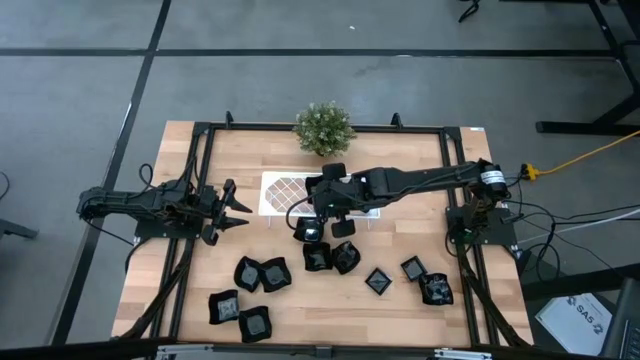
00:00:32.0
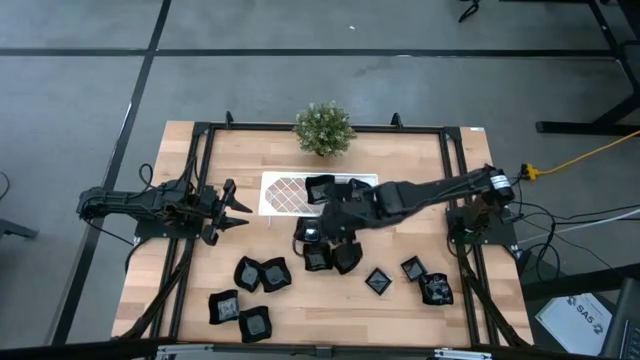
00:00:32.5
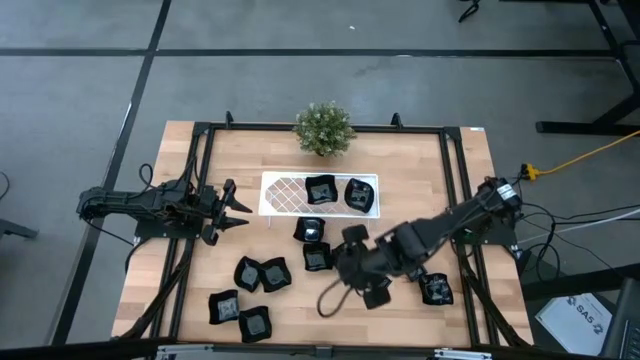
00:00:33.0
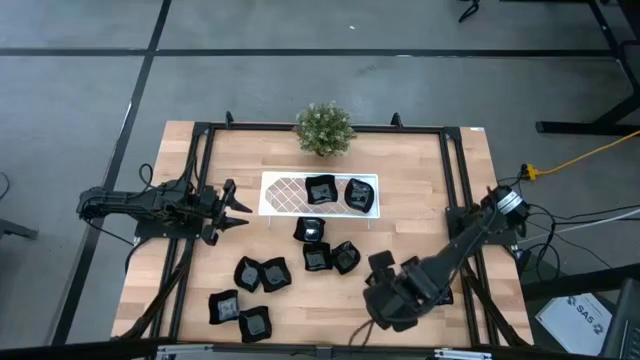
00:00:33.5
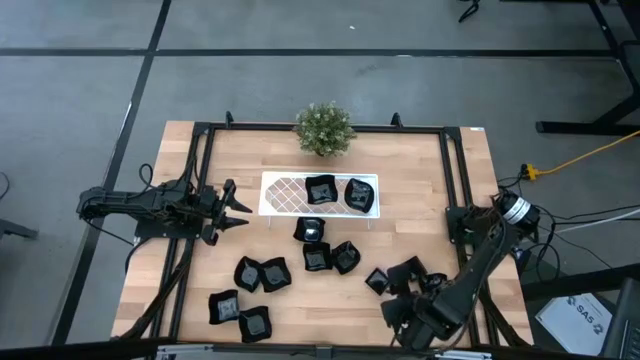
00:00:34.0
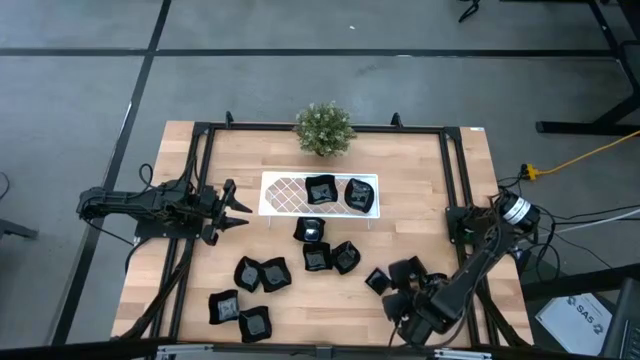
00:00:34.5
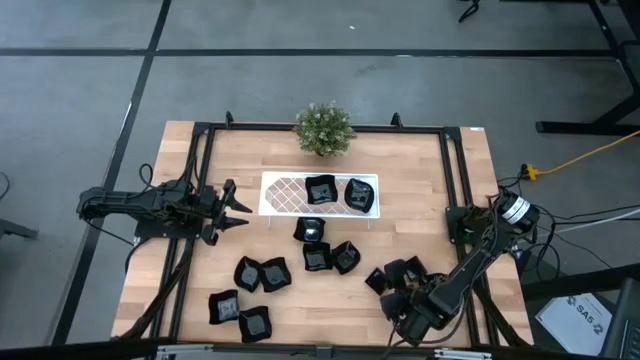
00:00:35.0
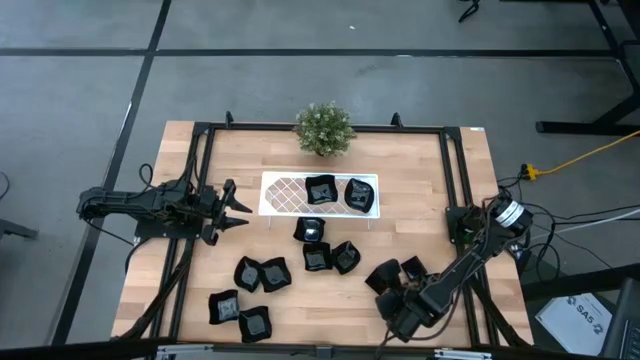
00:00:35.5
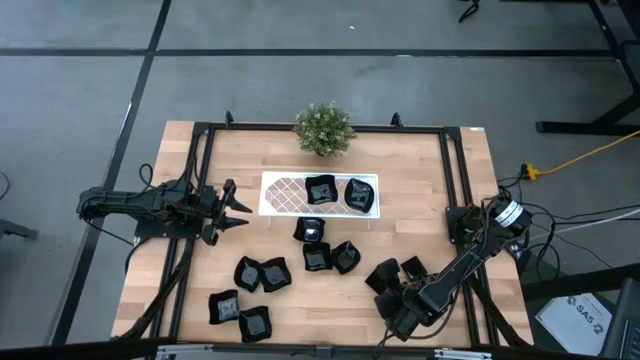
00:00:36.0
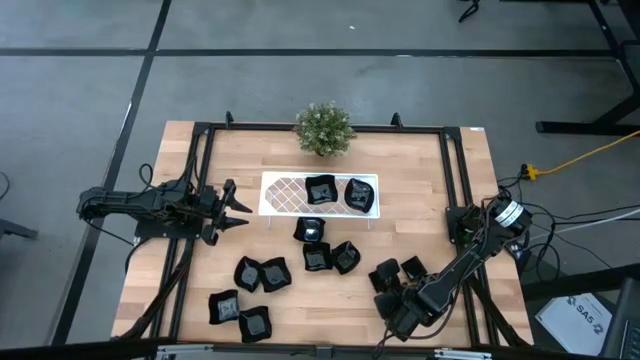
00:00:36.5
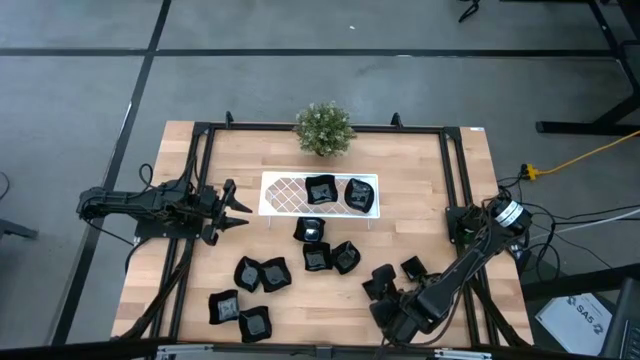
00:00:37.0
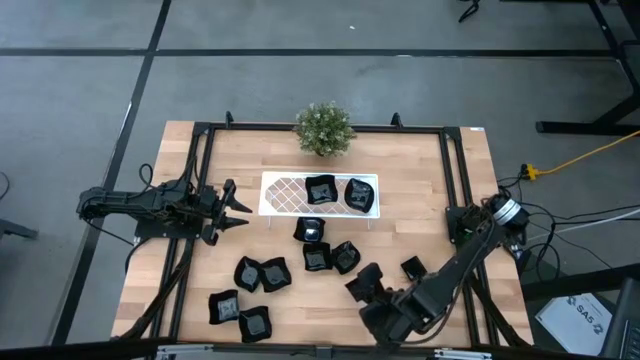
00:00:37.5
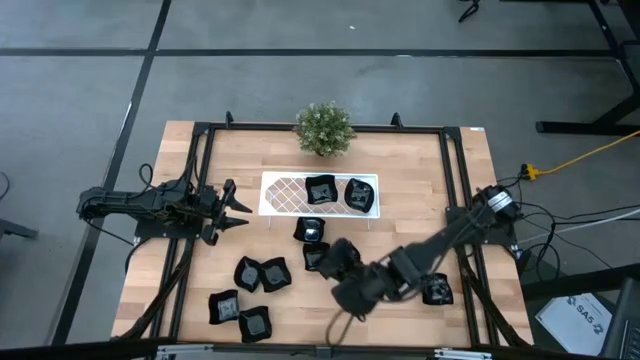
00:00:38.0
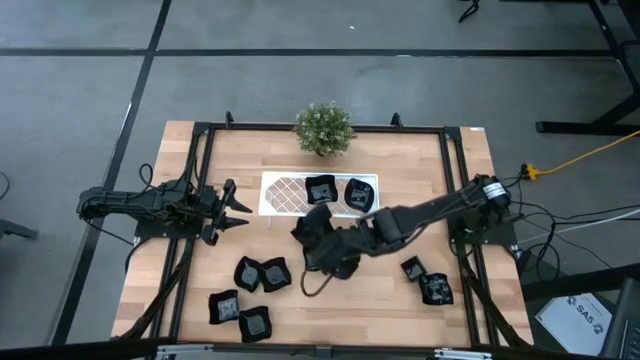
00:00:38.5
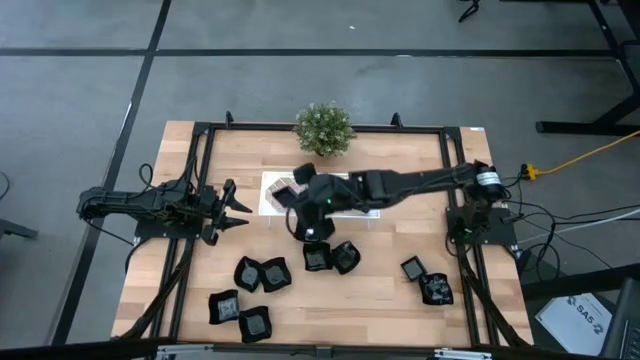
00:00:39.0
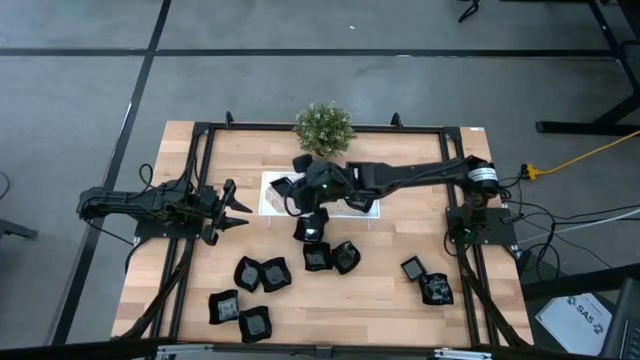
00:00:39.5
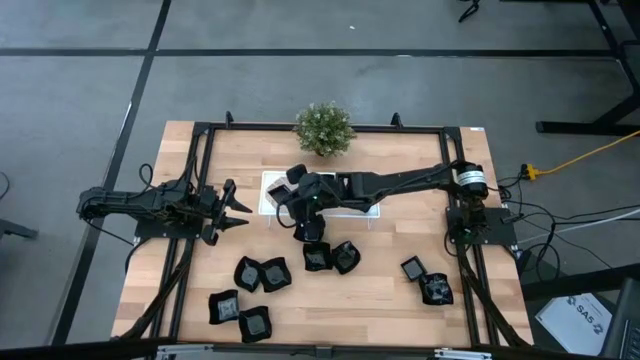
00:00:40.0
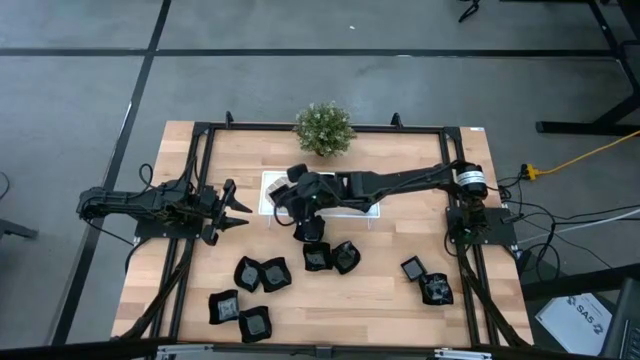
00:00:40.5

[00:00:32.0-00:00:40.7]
Task: Pick & Place Mini shaped plates
Put the black square plate on the shelf

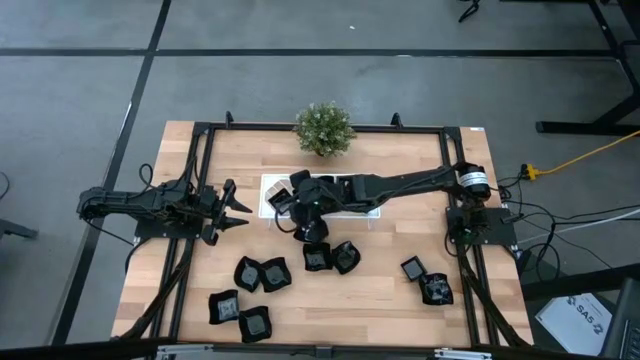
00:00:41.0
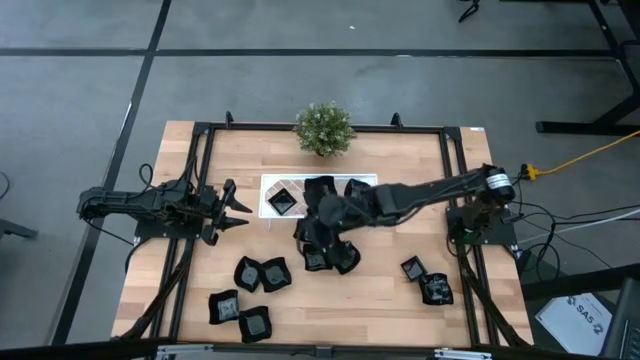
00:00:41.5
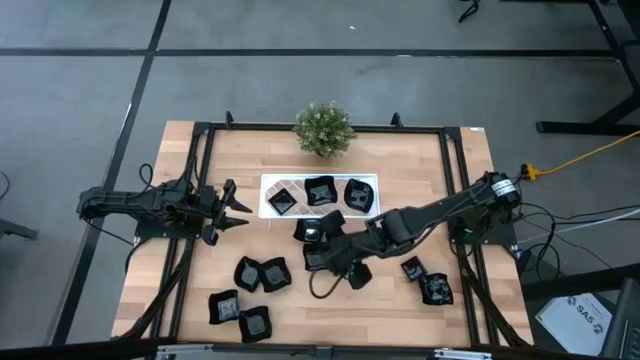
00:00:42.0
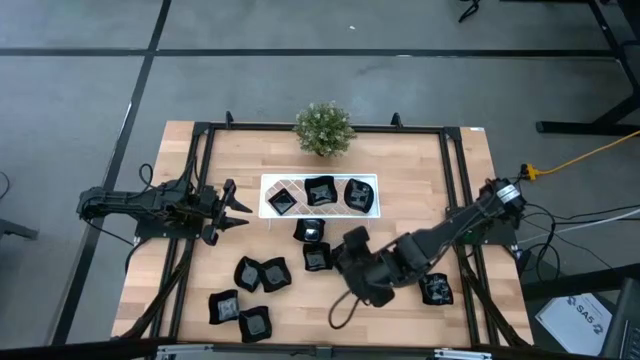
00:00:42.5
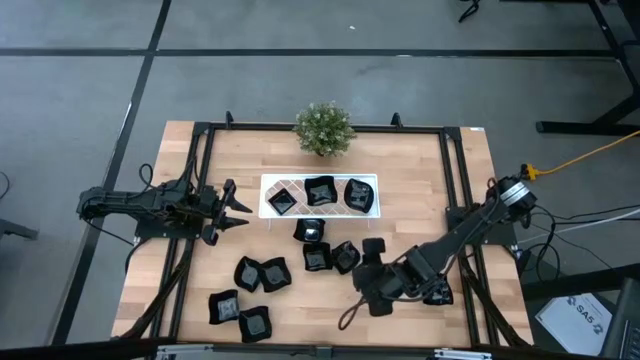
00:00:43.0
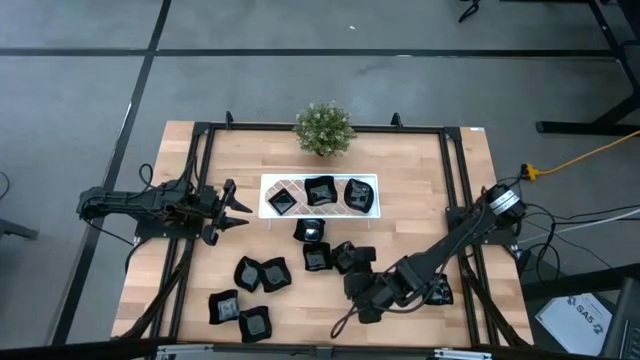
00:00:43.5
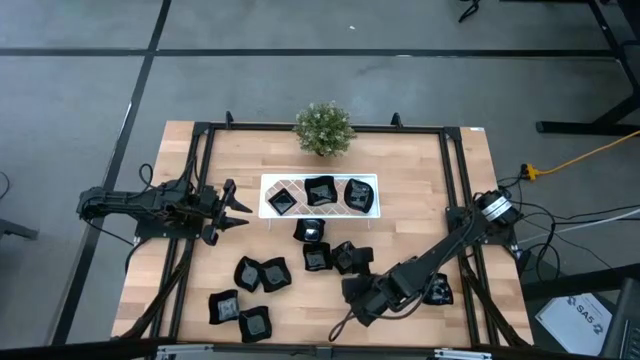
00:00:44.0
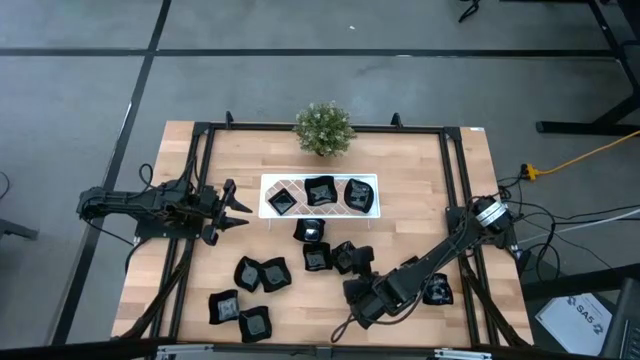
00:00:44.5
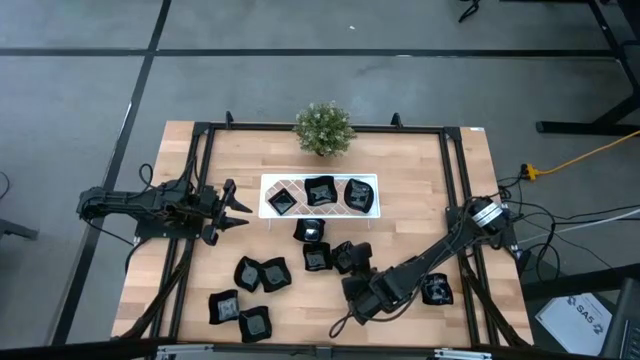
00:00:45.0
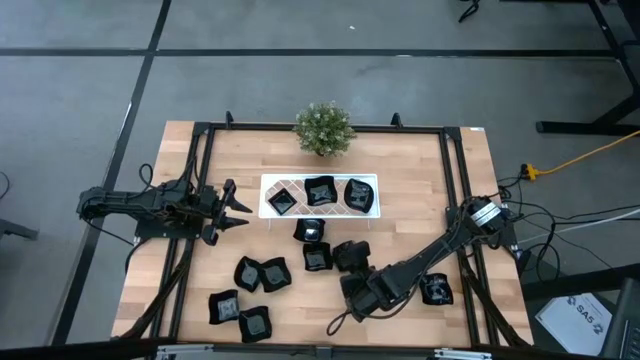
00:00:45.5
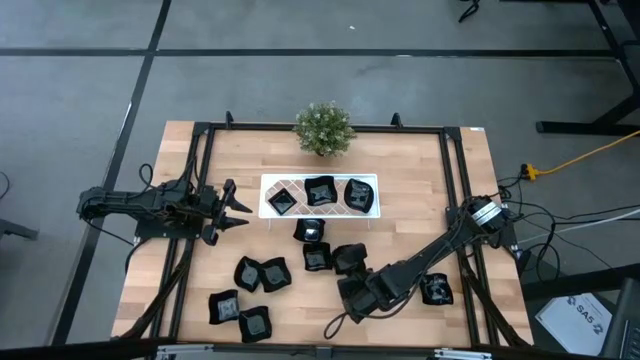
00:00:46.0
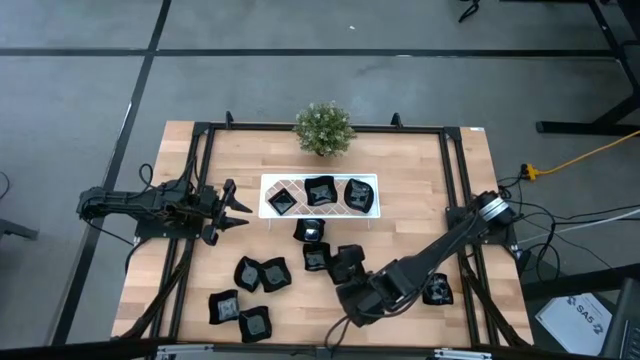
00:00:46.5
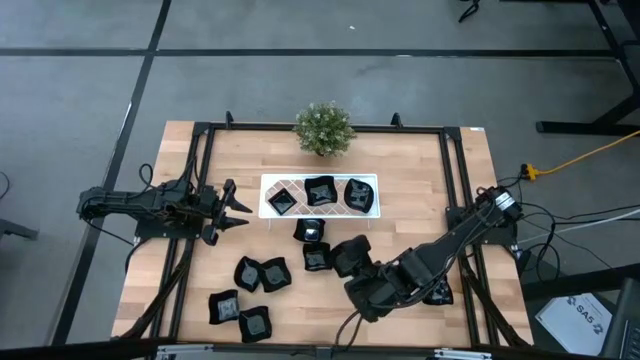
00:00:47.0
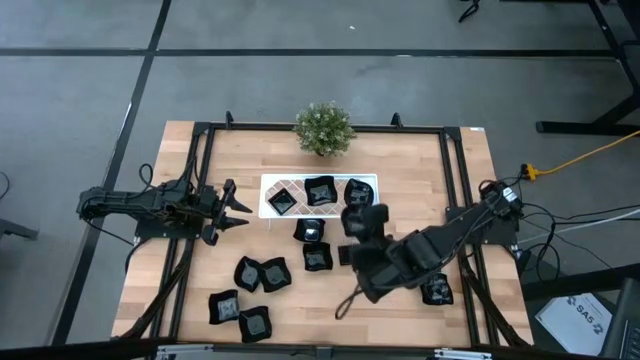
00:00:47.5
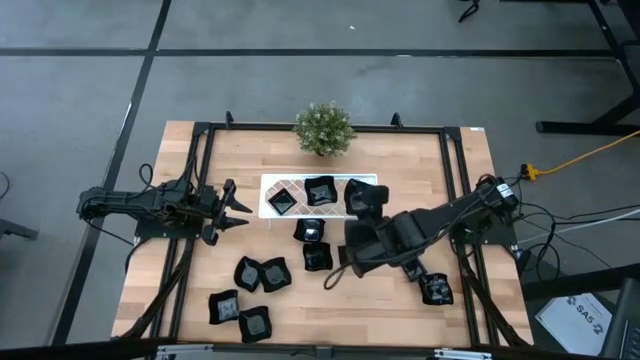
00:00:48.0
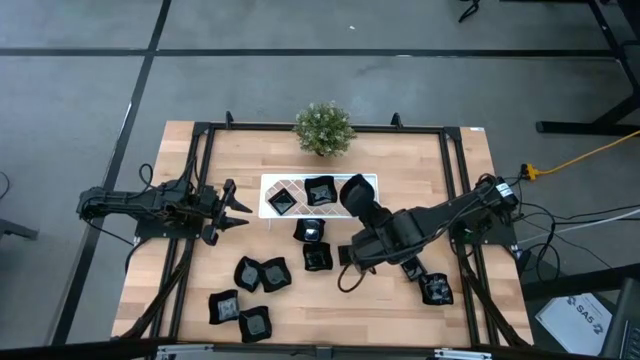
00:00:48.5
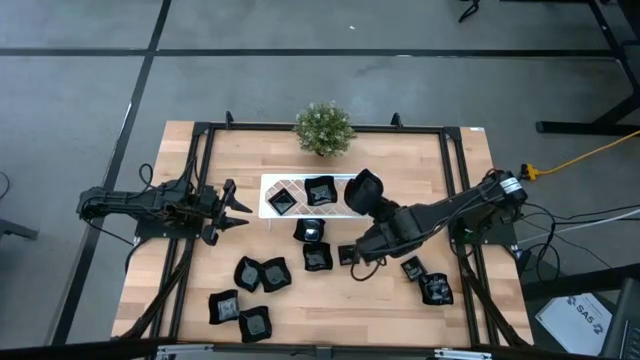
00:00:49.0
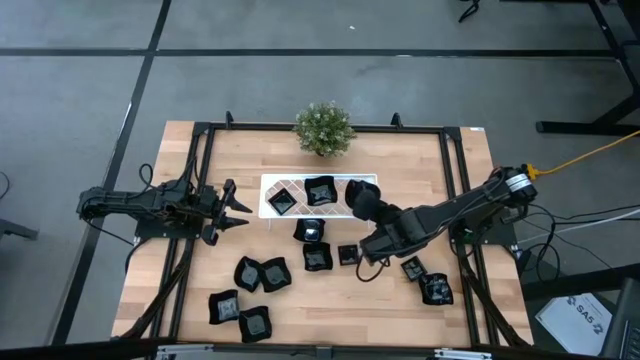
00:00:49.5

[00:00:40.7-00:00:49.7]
Stack the black leaf-shaped plate on top of the black leaf-shaped plate on the shelf

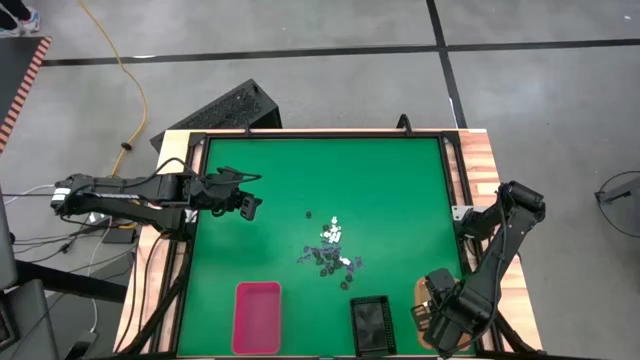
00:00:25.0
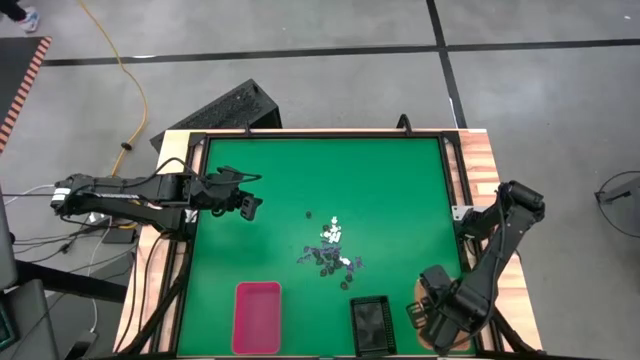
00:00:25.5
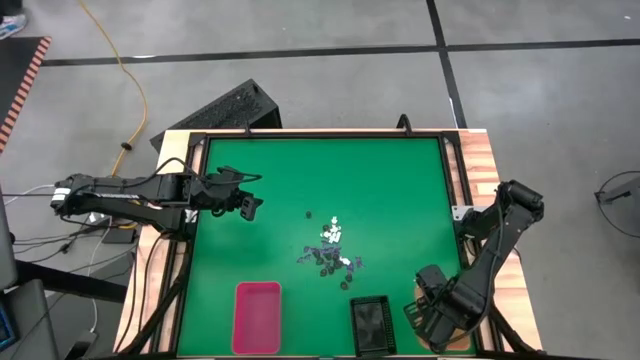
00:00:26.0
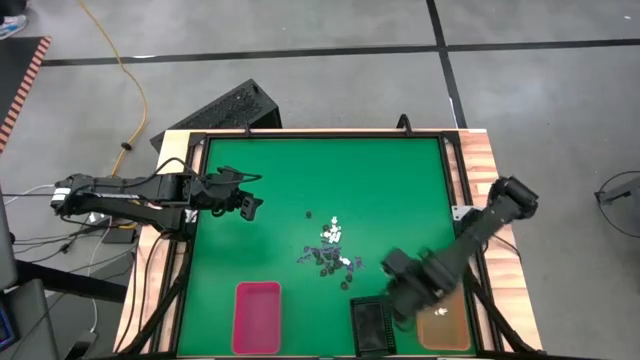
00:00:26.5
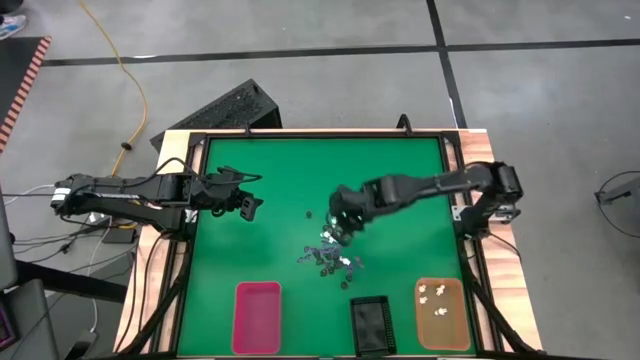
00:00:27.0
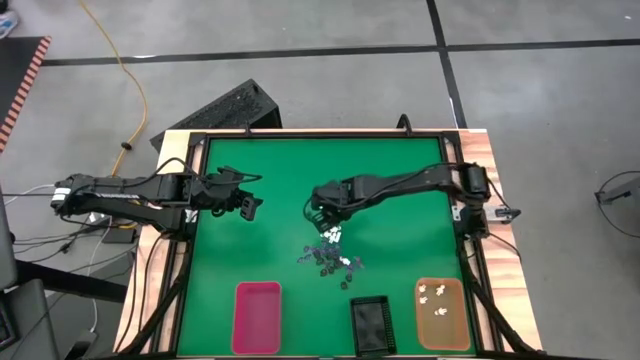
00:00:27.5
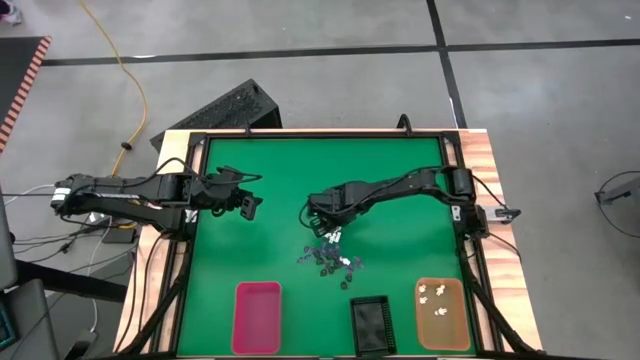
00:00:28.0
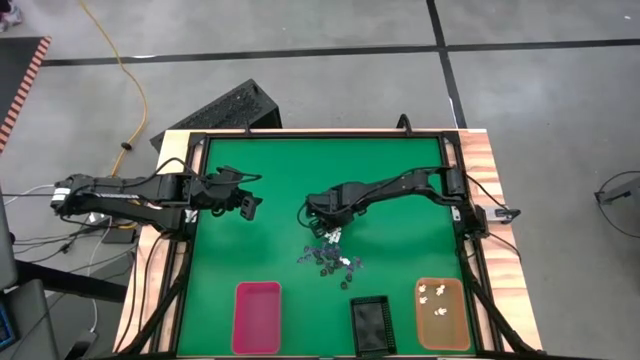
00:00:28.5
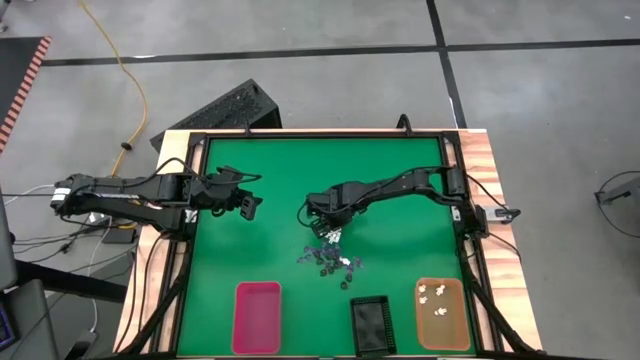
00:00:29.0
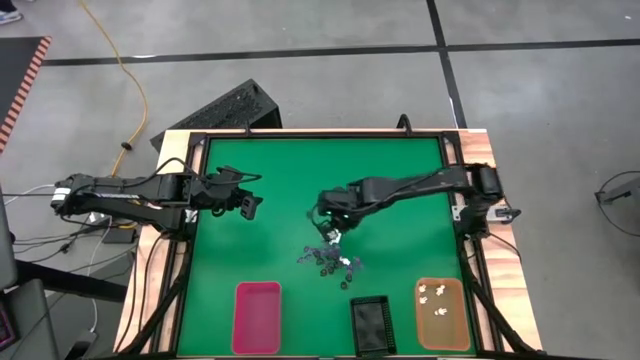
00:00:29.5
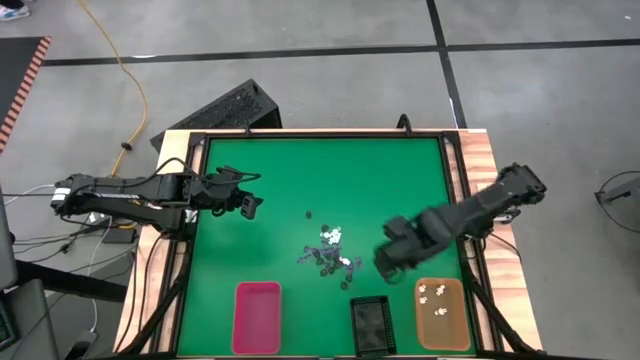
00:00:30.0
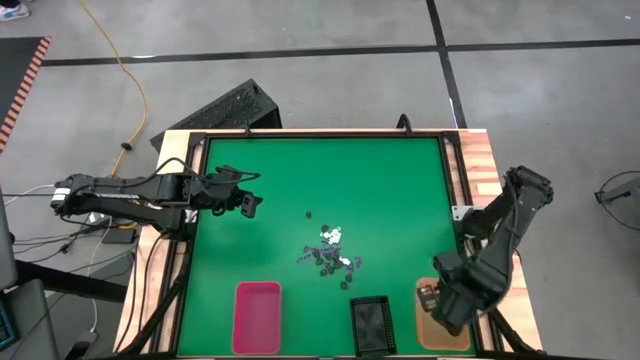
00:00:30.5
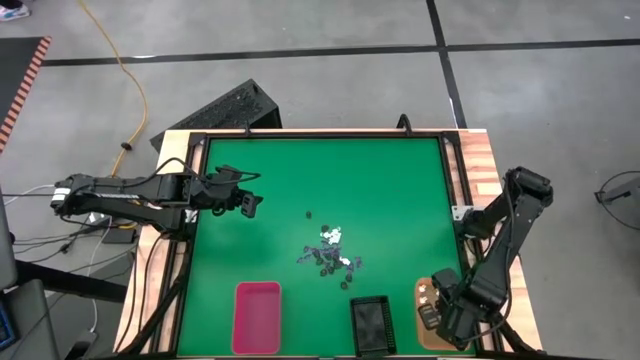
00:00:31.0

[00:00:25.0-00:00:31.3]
Task: Sort Halloween decoration
Put the white skeleton toy into the right orange organizing bin
